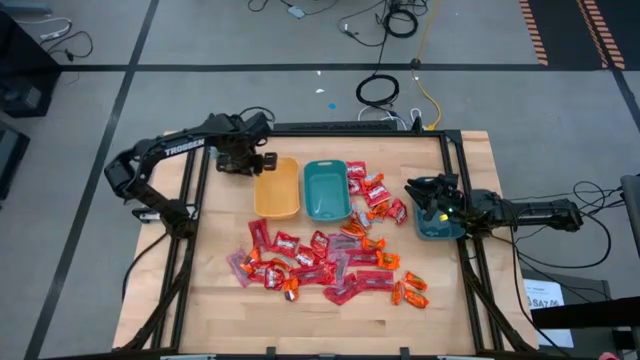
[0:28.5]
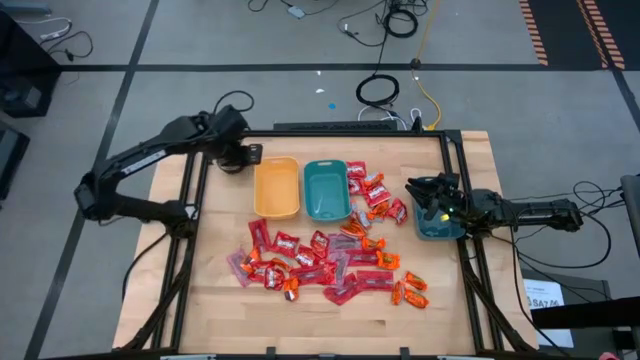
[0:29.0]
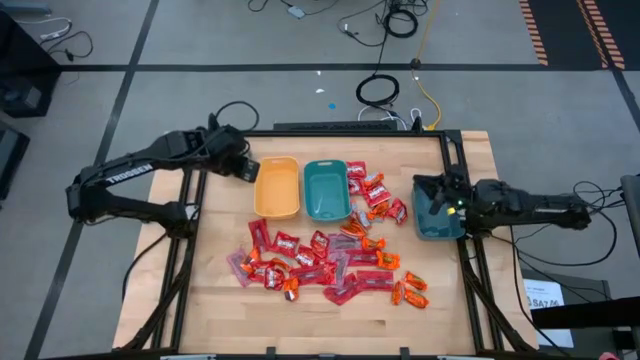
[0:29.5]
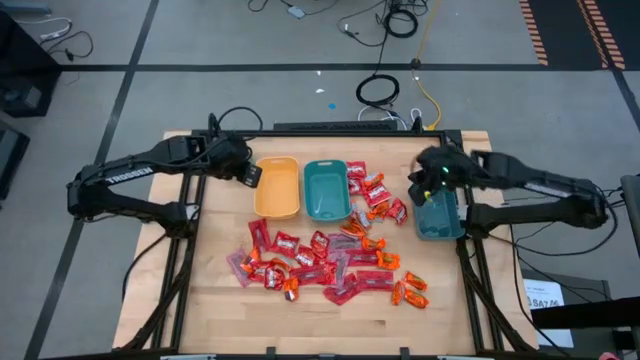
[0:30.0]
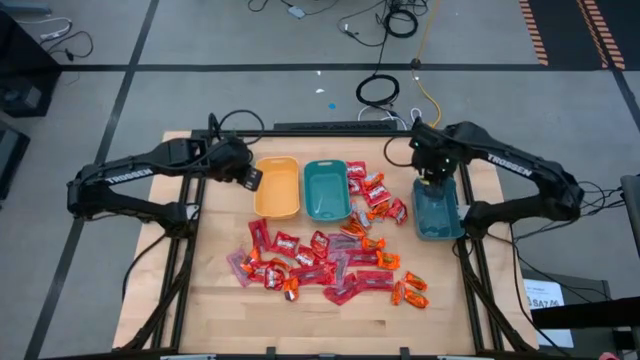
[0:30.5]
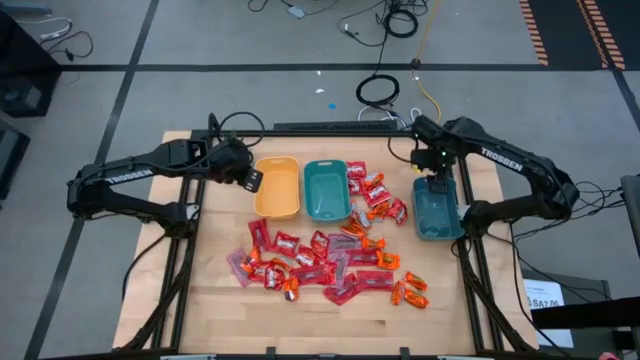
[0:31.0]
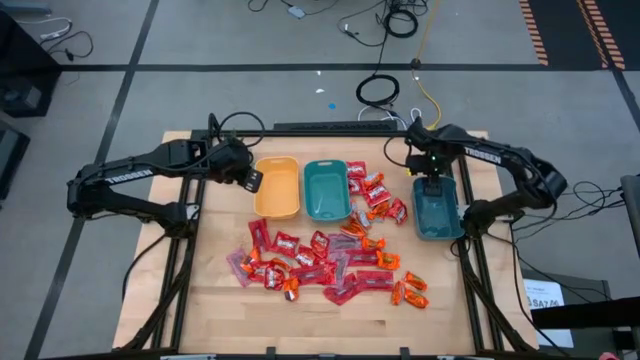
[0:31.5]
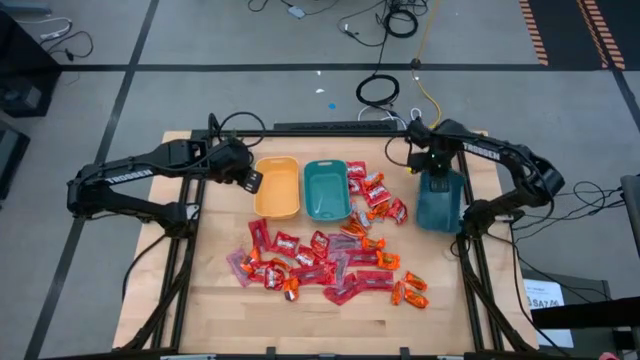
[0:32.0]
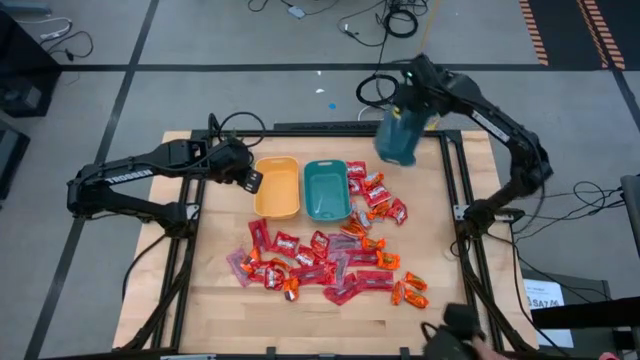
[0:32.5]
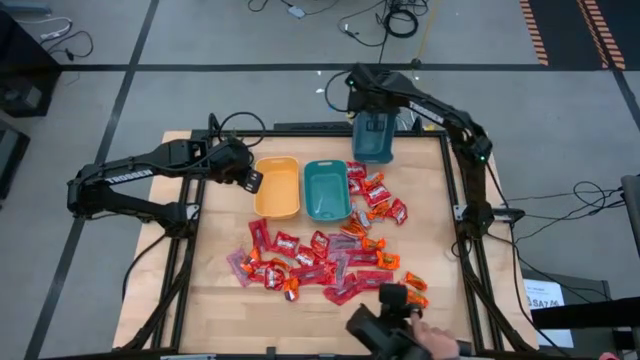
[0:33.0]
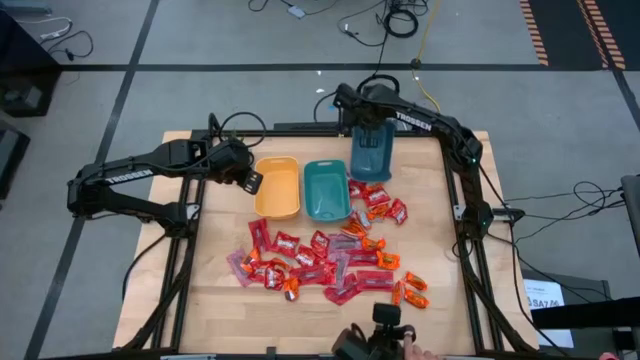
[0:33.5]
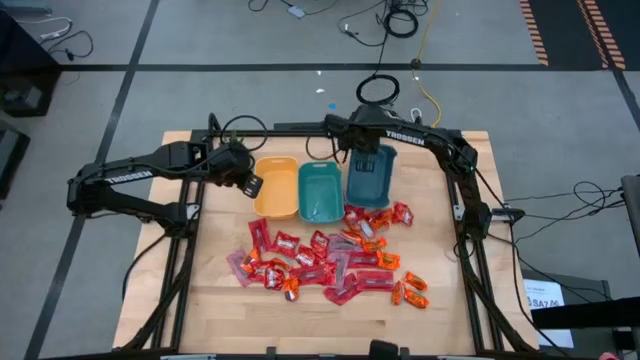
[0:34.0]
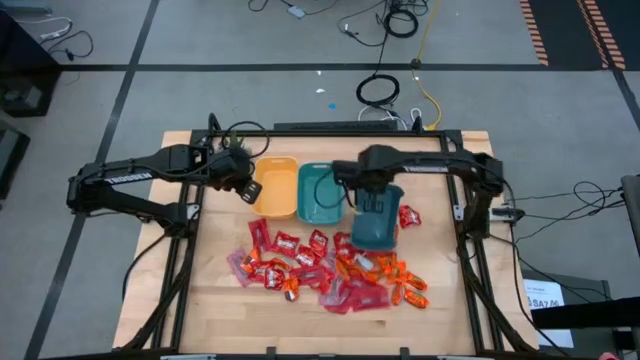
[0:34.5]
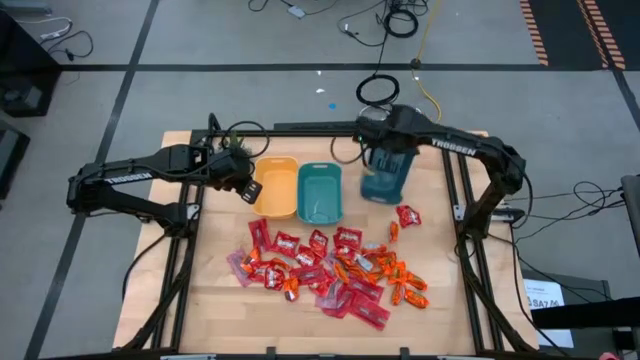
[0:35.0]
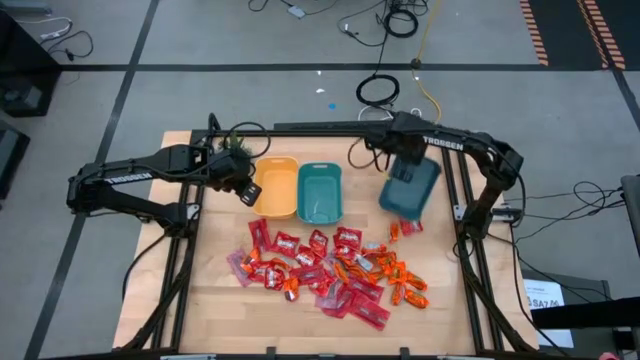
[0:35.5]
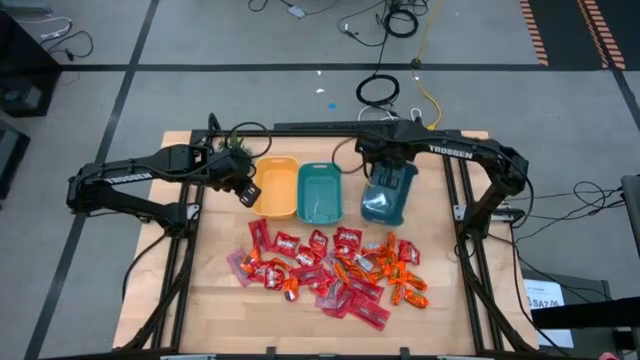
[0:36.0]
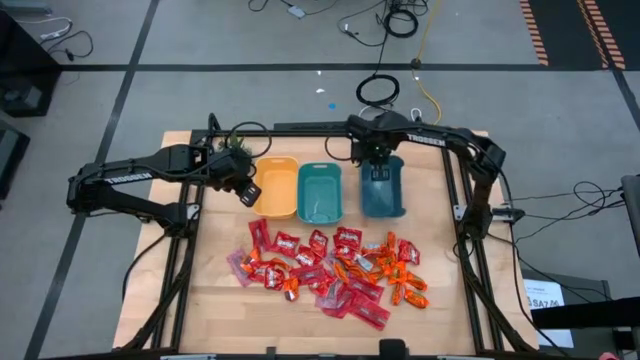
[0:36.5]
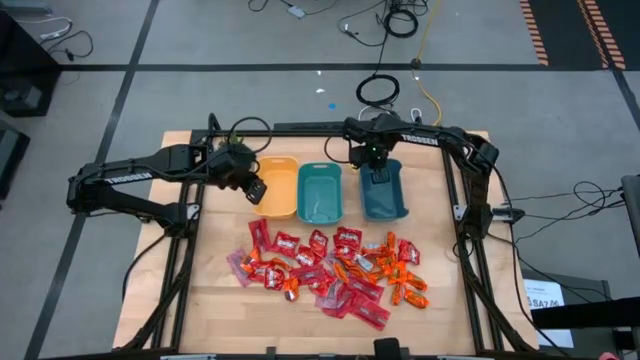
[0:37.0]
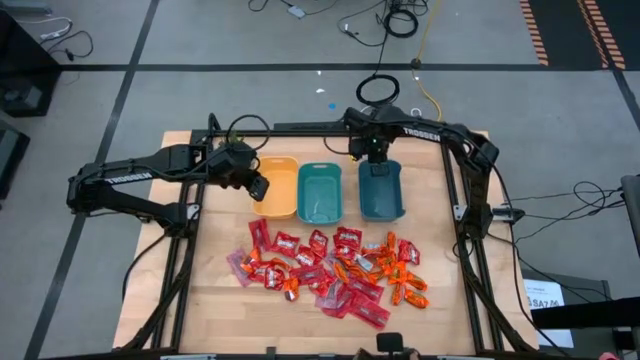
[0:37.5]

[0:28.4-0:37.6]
Task: Sort candy
Move the blue bin to the upper middle

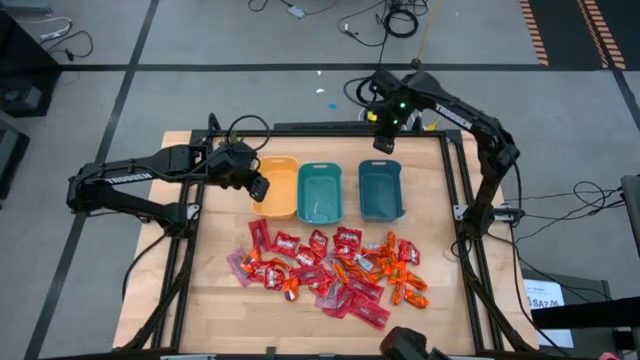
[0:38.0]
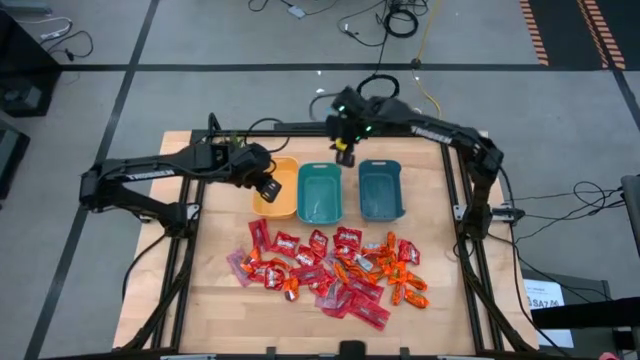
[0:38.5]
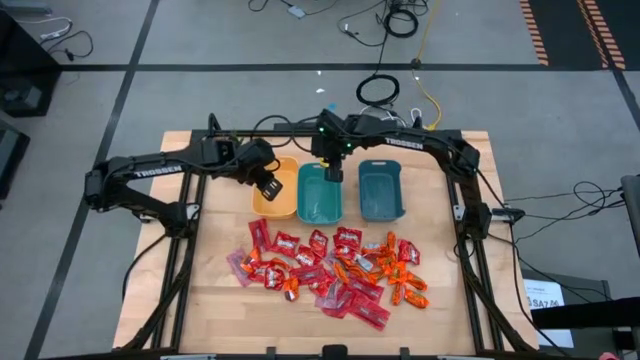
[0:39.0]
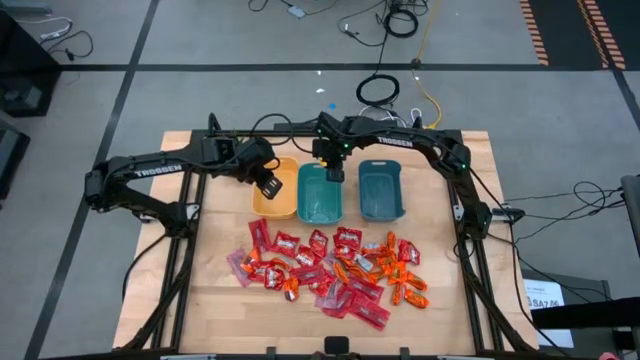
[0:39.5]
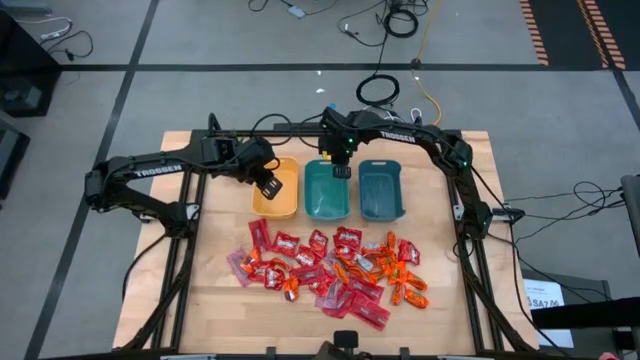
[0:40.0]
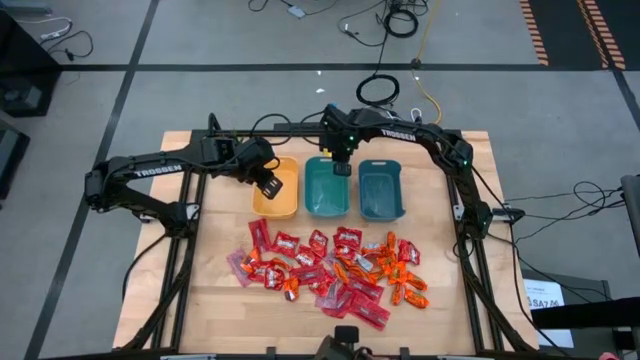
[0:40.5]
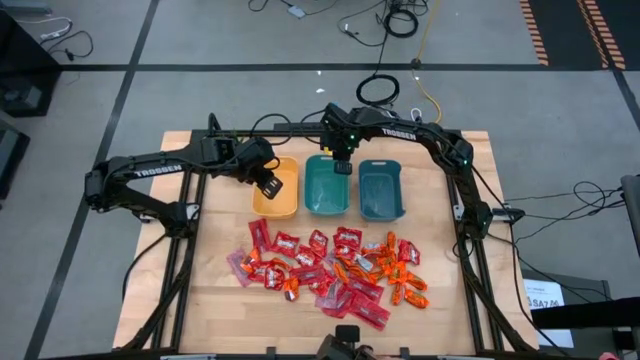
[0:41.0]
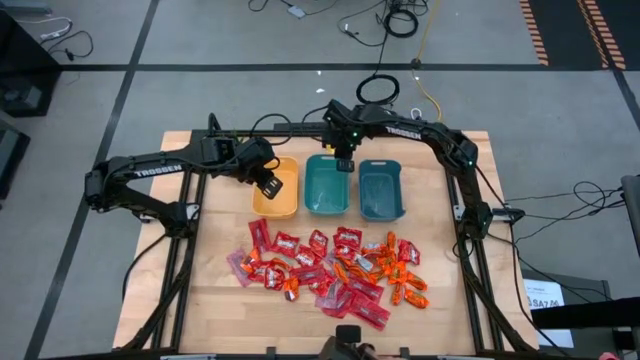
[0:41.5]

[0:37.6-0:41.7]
Adjust the green bin

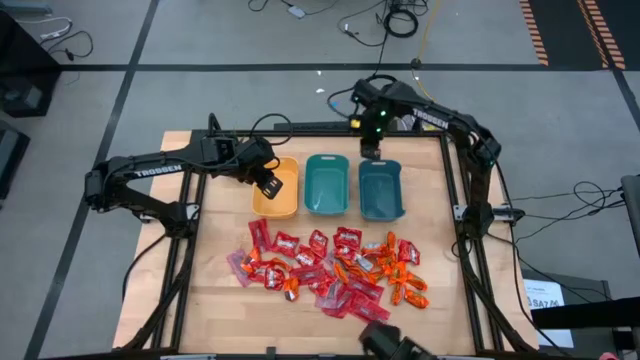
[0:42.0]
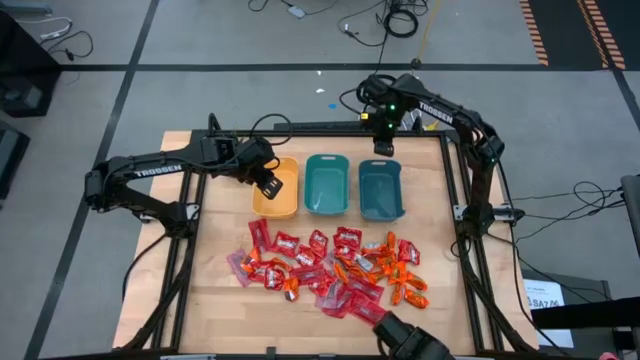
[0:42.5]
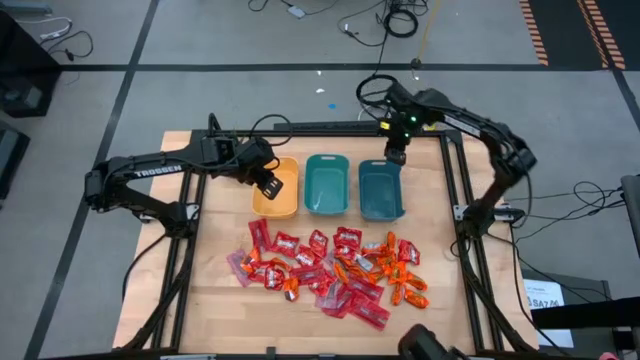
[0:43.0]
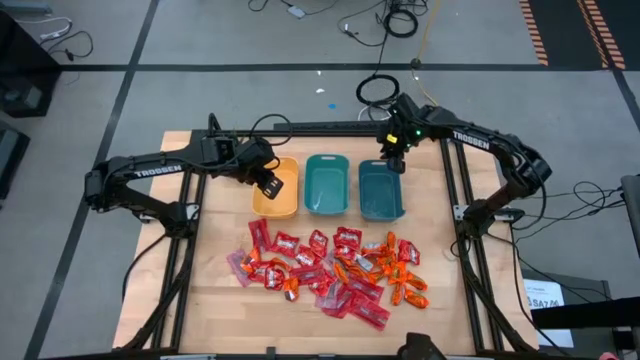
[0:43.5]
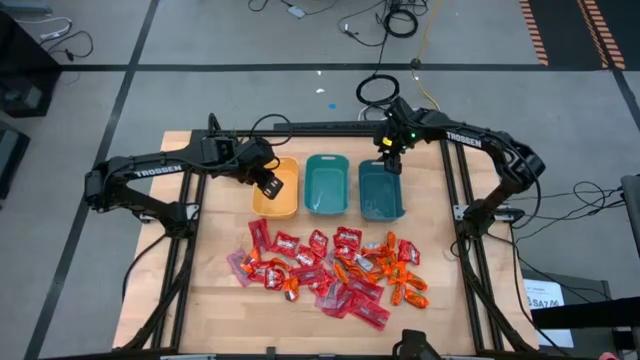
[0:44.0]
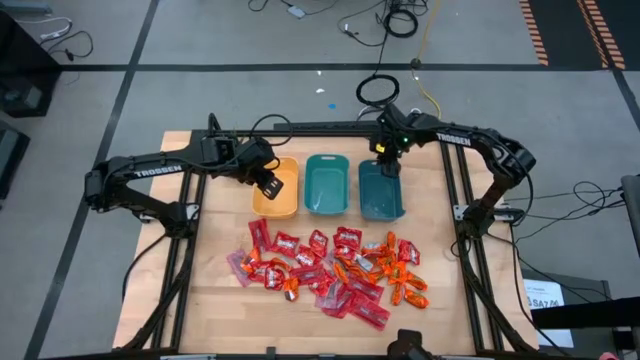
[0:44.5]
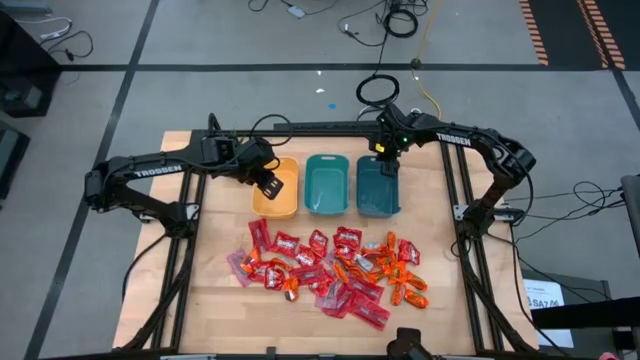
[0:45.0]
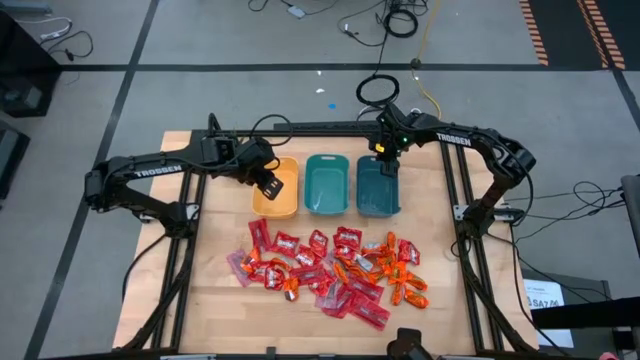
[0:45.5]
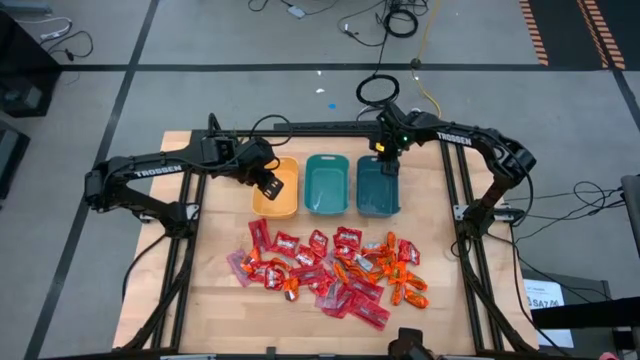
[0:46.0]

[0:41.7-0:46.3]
Adjust the blue bin

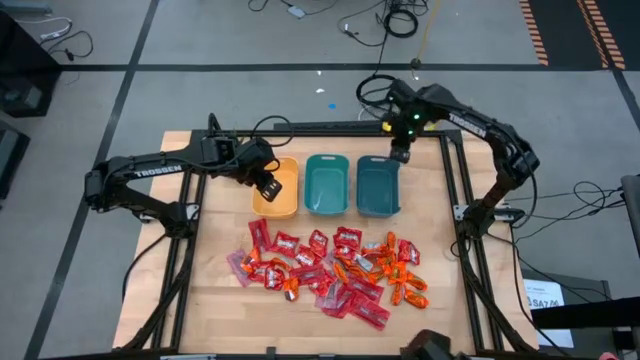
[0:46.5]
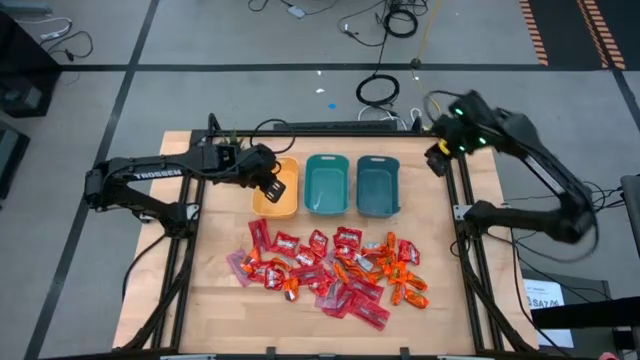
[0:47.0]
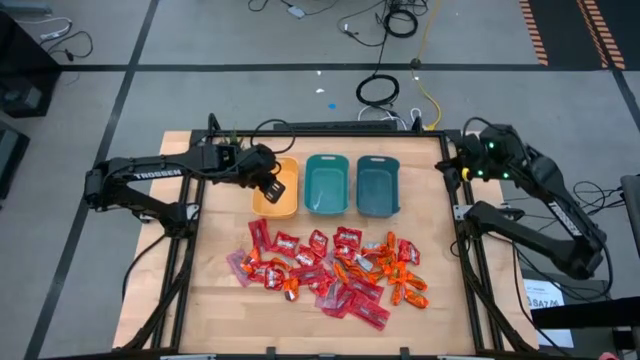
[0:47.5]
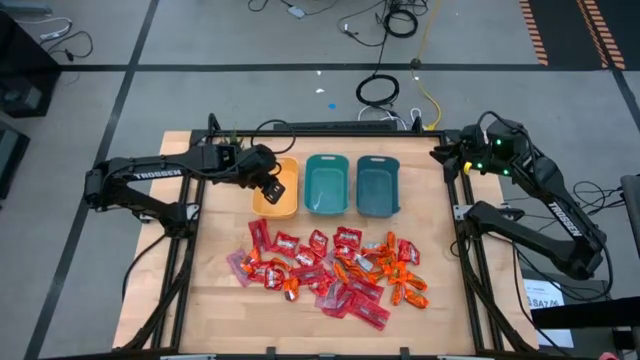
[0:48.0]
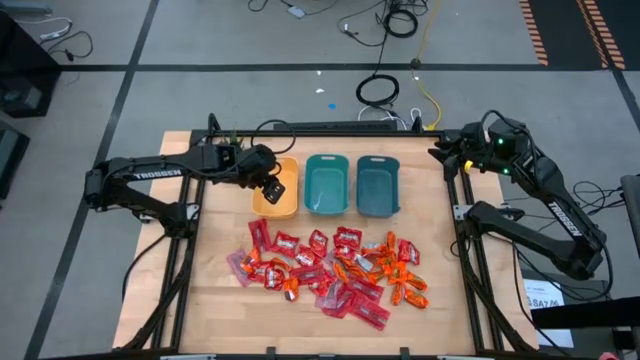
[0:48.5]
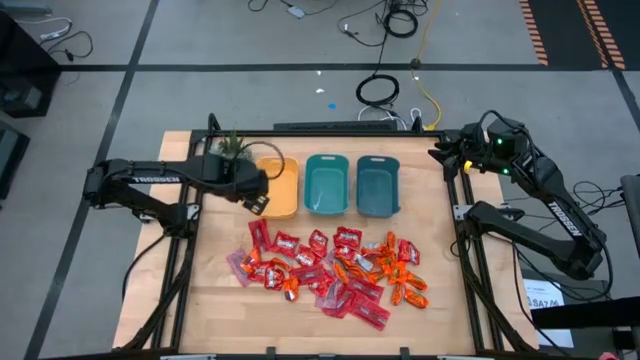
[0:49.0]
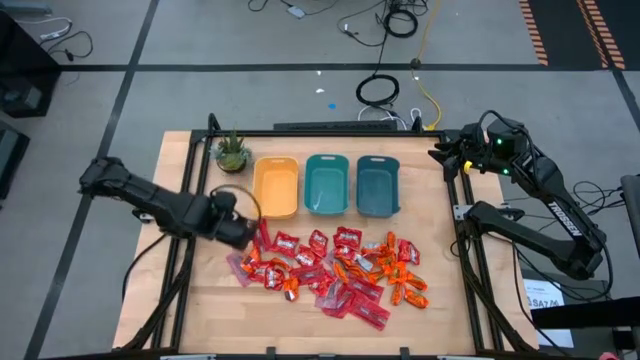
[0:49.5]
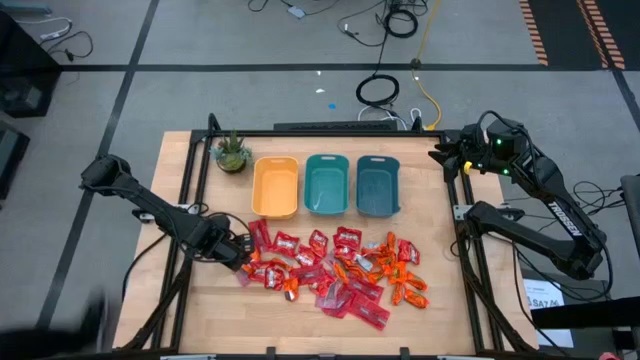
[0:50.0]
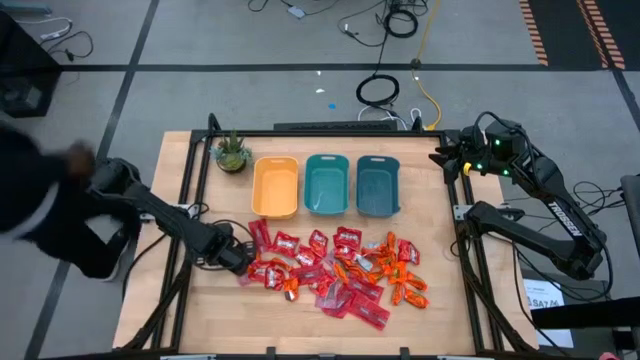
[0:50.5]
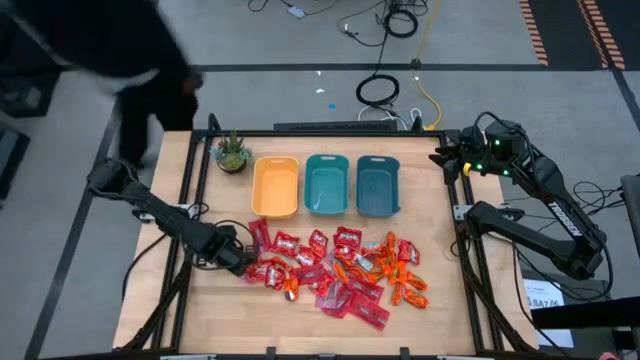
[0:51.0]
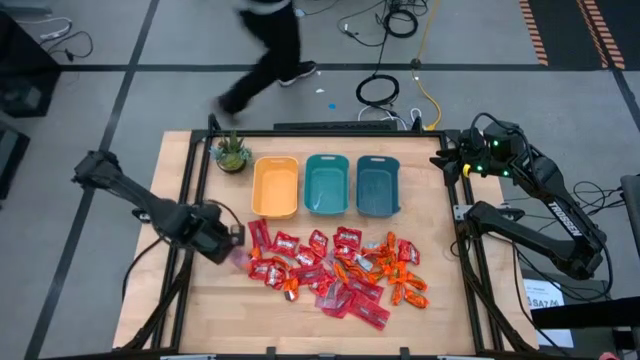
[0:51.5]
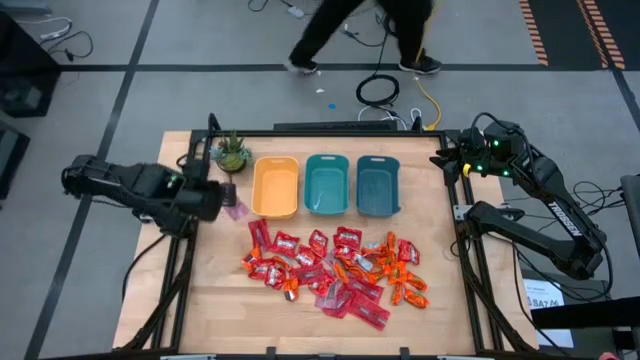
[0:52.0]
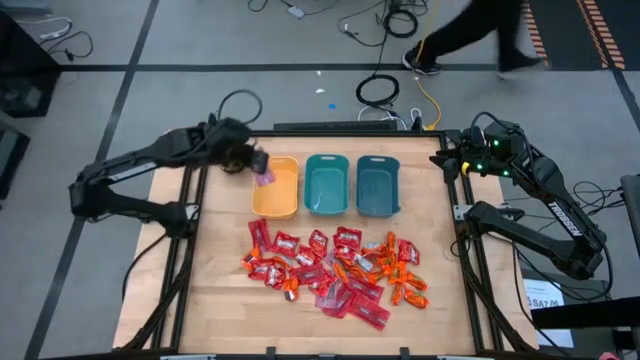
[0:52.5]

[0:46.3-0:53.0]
Put the red candy into the top left yellow bin
